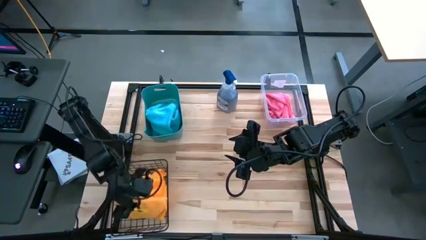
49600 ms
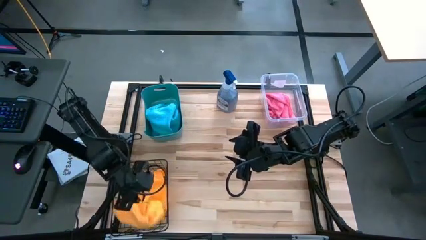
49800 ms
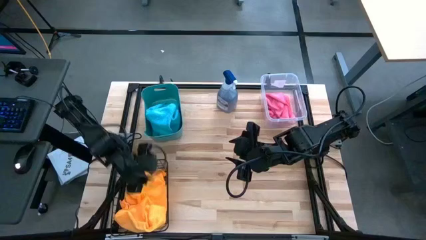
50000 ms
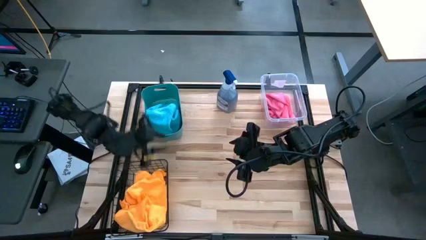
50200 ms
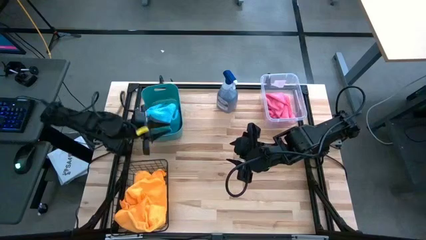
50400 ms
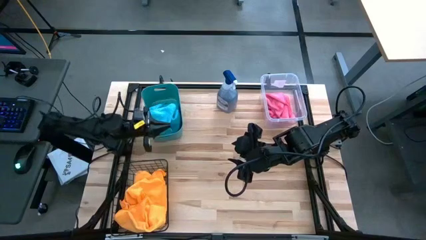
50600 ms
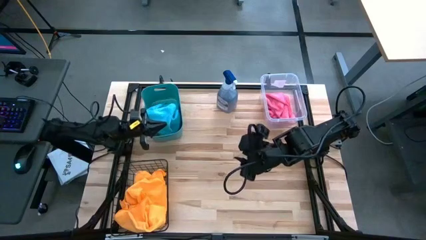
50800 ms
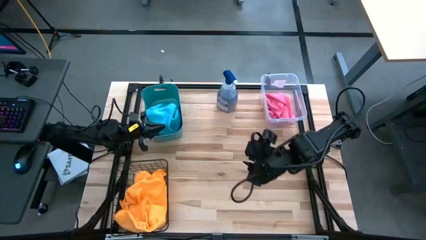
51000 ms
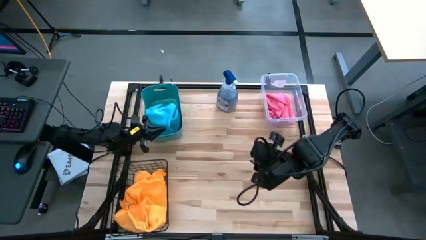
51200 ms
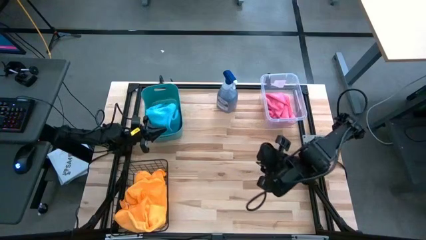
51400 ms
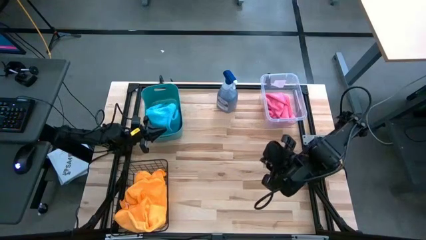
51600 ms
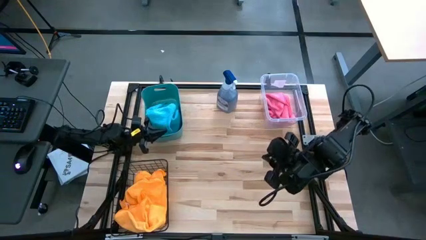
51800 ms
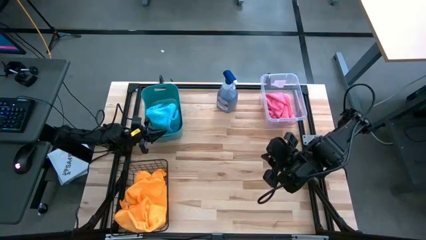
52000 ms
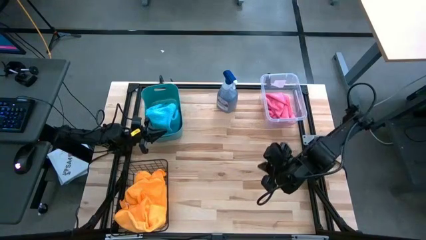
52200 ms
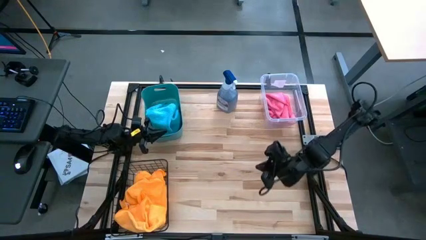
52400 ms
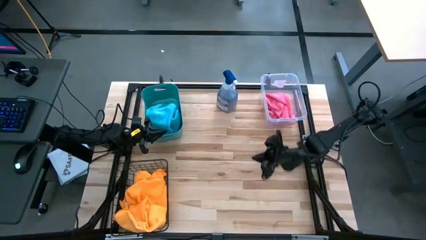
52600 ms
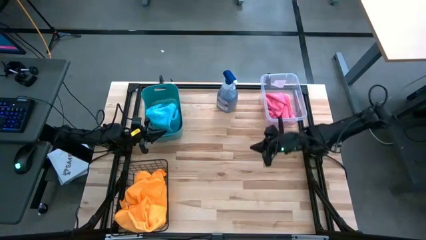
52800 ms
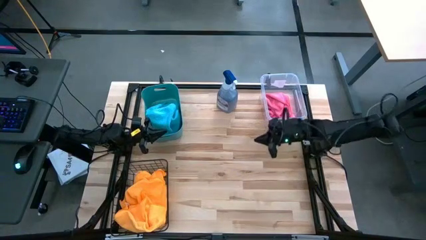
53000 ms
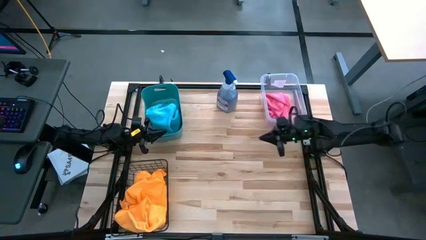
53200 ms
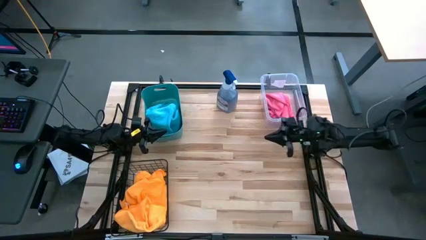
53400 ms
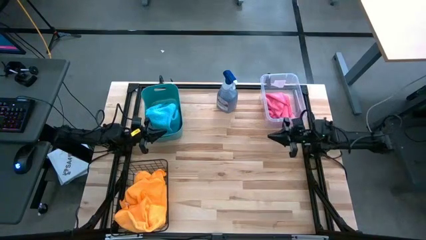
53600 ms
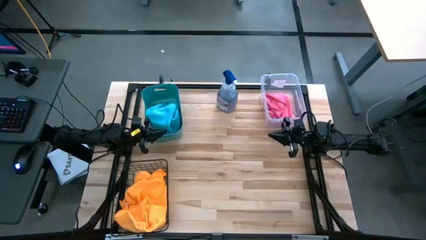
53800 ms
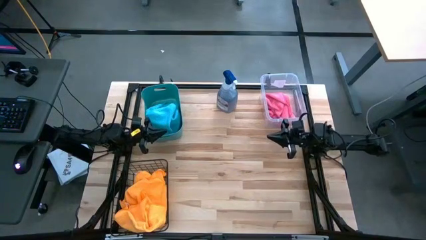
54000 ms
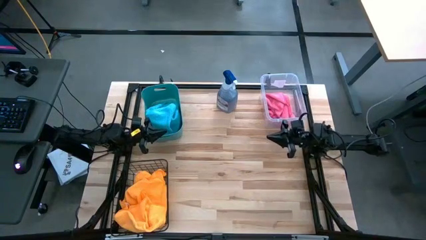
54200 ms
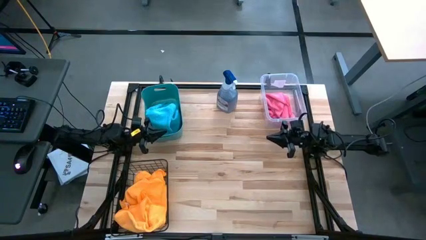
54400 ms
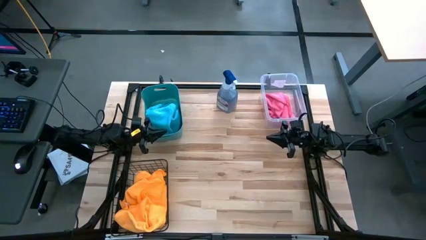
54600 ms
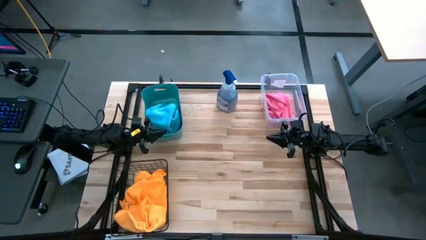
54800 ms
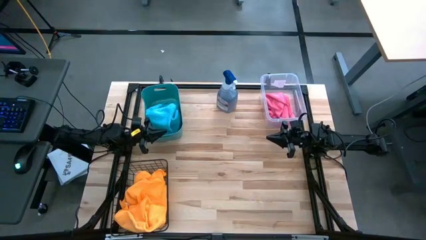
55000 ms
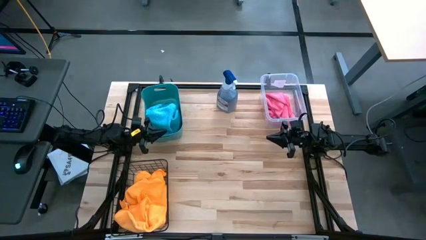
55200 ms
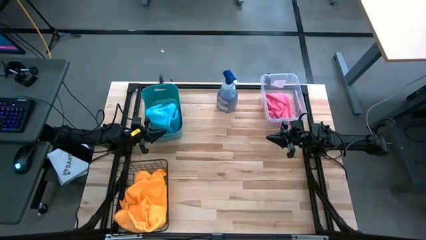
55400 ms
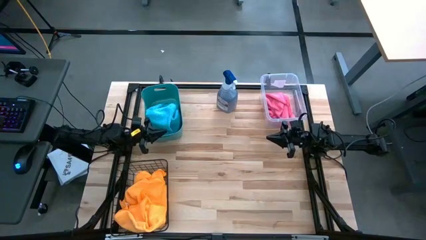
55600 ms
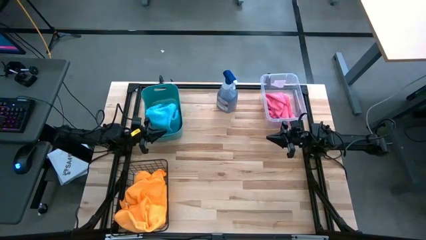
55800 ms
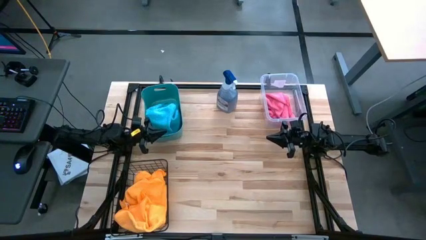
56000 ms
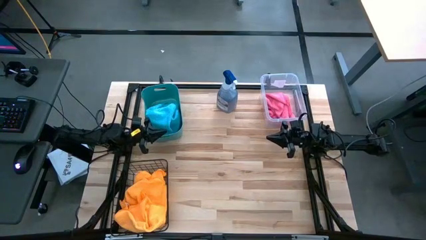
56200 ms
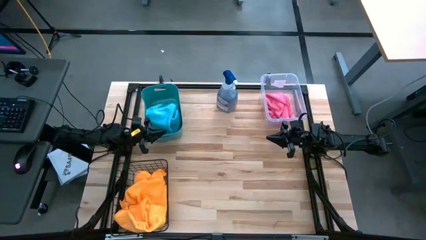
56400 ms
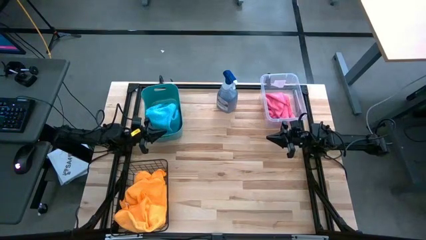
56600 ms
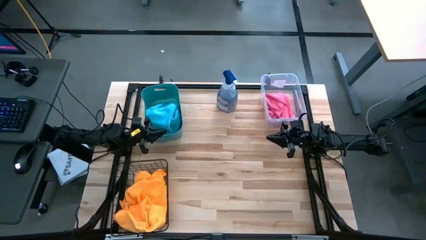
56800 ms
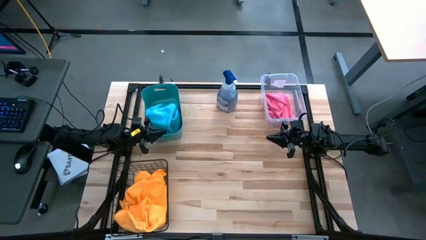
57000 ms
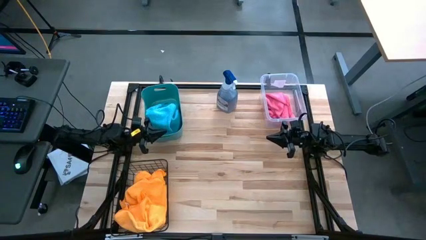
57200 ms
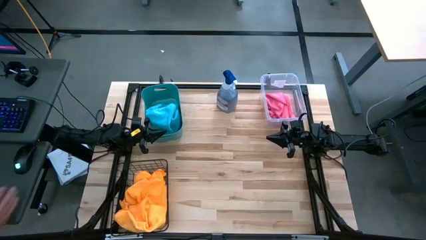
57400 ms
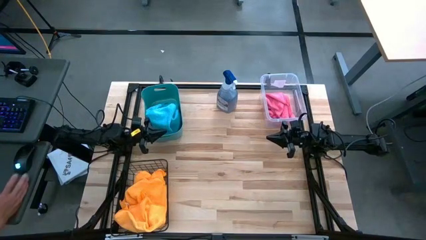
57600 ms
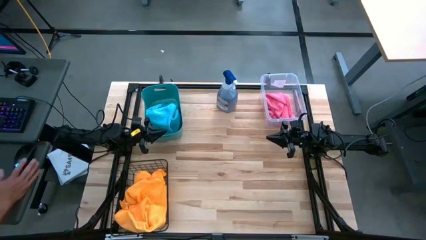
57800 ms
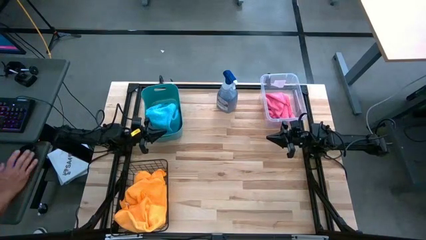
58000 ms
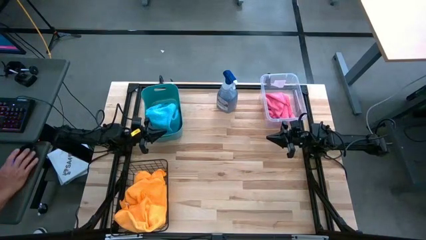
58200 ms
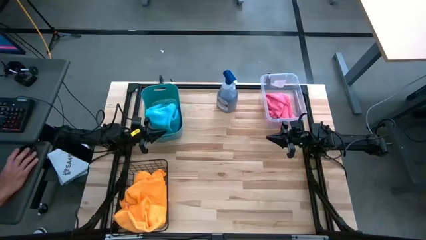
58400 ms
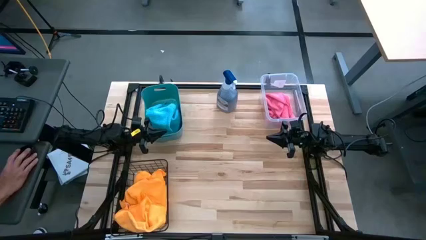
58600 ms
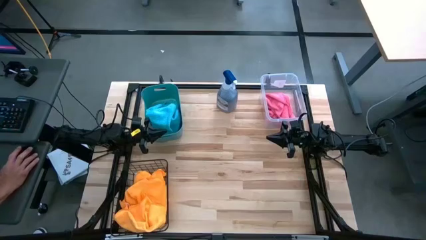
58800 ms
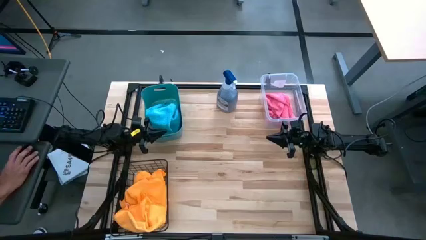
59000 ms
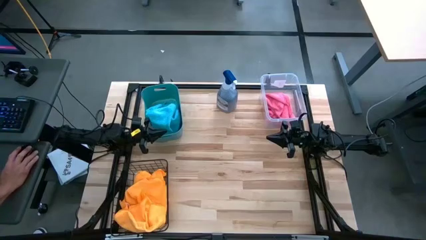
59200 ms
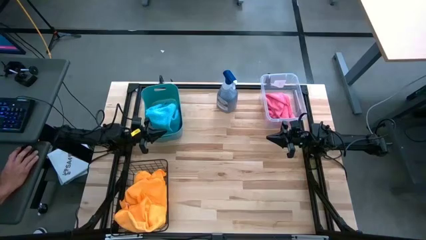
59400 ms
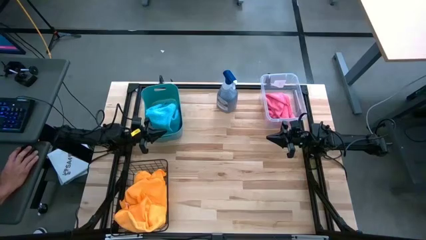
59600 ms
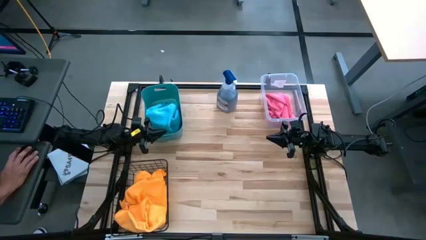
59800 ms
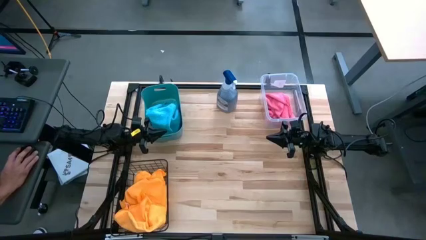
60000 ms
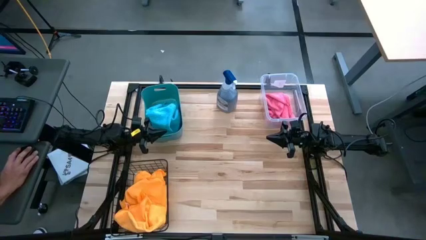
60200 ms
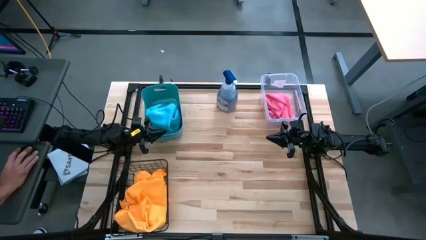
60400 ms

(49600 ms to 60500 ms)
Task: Sort microfiber towel by color & place in baskets
Return to Home Position
